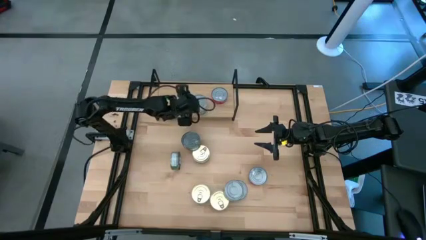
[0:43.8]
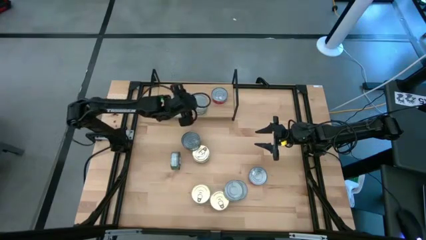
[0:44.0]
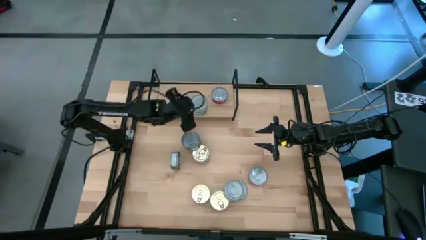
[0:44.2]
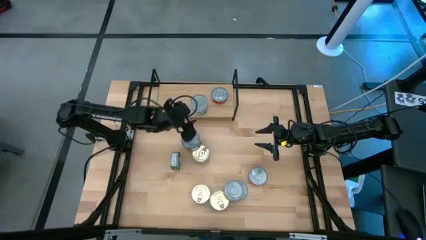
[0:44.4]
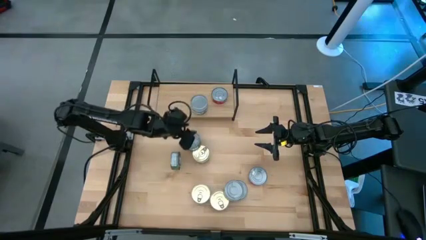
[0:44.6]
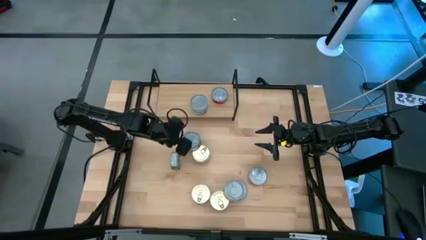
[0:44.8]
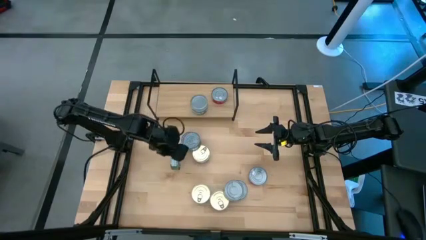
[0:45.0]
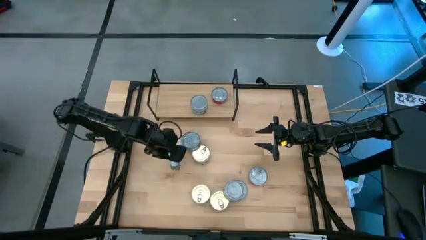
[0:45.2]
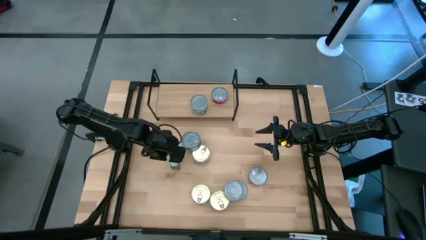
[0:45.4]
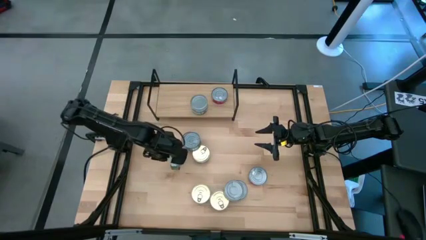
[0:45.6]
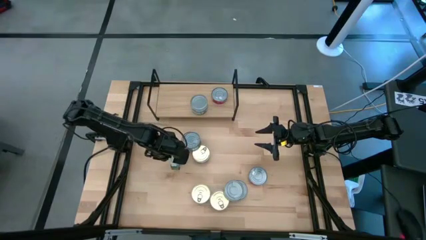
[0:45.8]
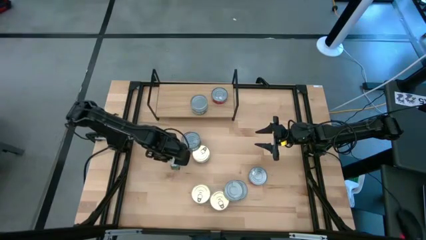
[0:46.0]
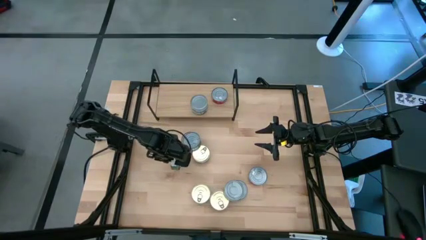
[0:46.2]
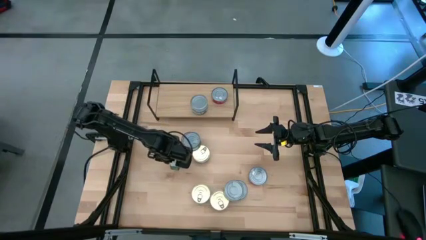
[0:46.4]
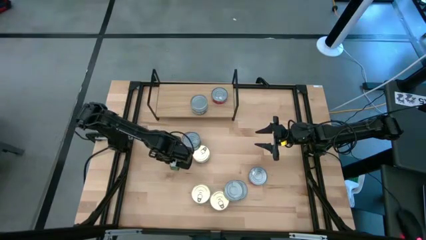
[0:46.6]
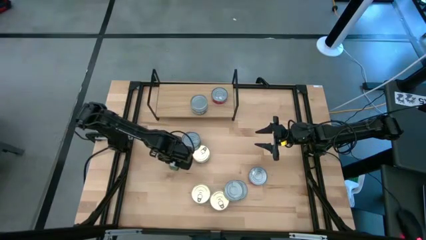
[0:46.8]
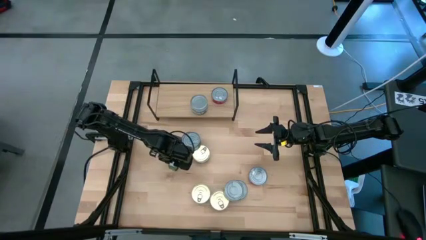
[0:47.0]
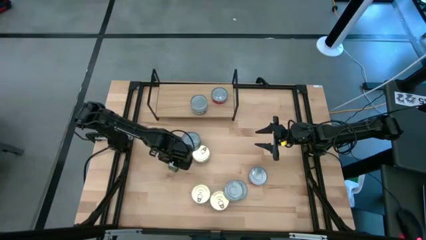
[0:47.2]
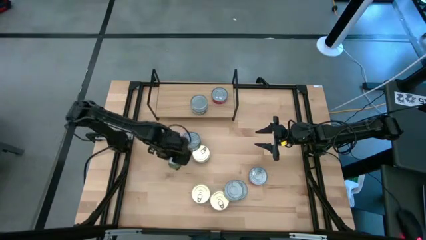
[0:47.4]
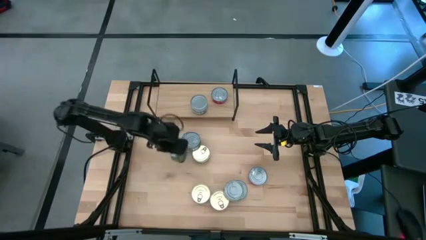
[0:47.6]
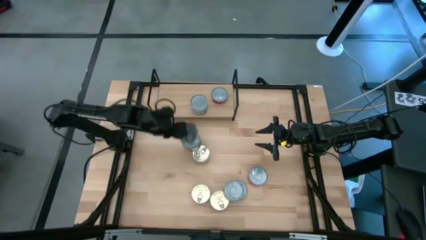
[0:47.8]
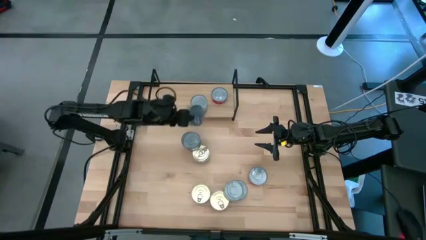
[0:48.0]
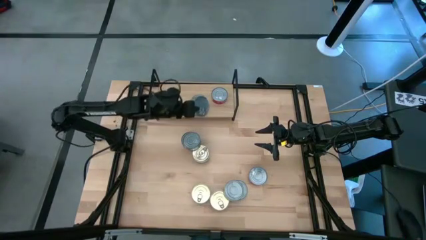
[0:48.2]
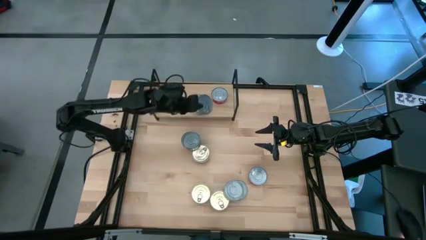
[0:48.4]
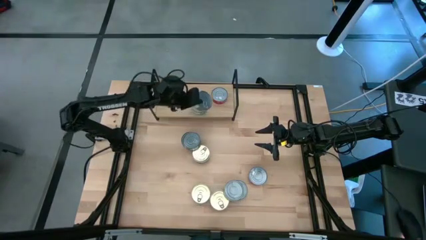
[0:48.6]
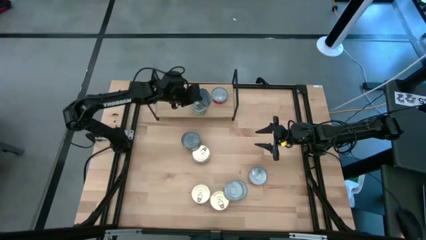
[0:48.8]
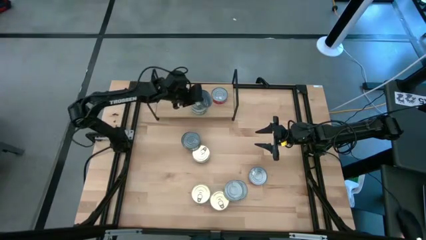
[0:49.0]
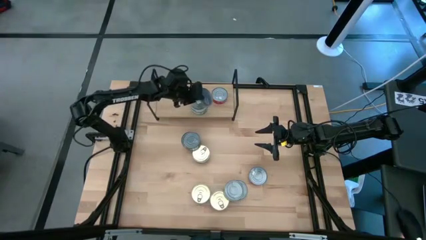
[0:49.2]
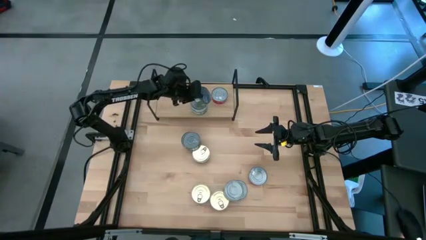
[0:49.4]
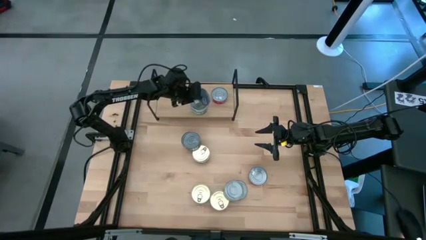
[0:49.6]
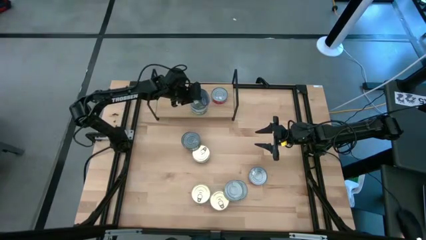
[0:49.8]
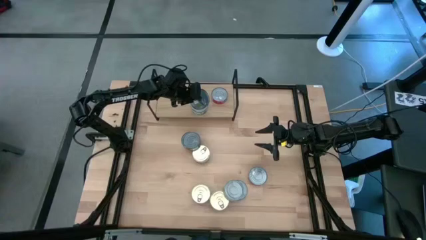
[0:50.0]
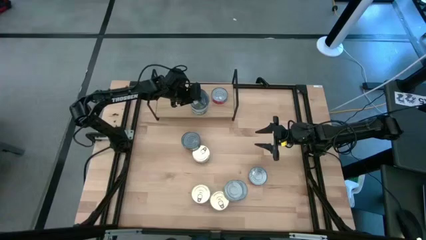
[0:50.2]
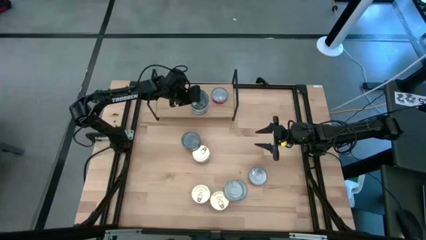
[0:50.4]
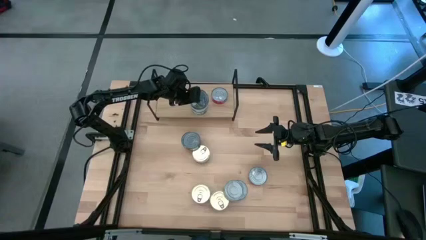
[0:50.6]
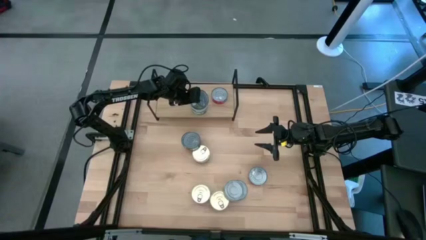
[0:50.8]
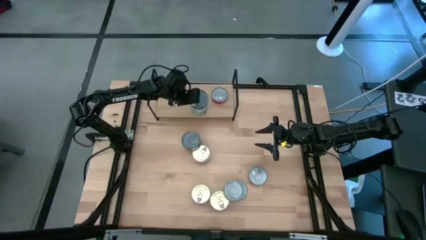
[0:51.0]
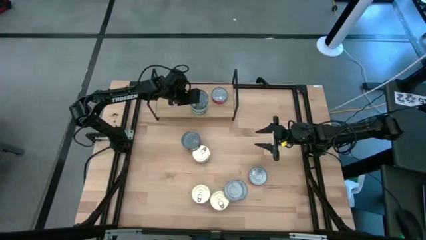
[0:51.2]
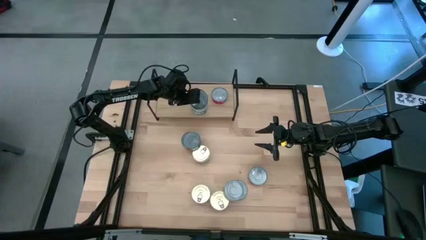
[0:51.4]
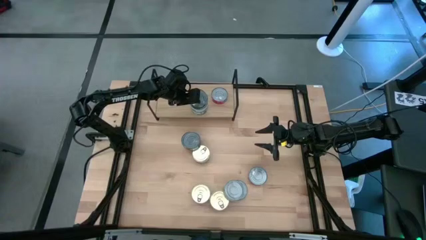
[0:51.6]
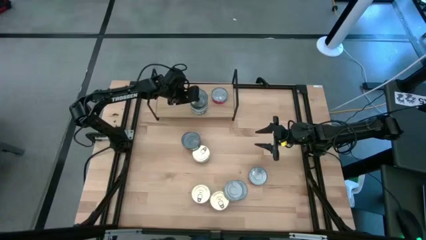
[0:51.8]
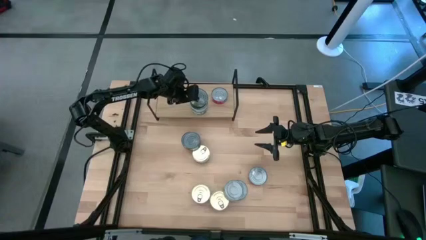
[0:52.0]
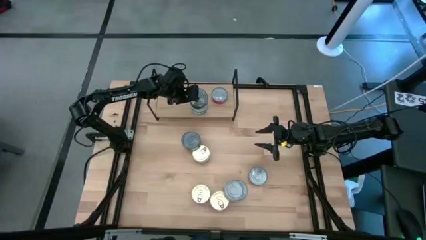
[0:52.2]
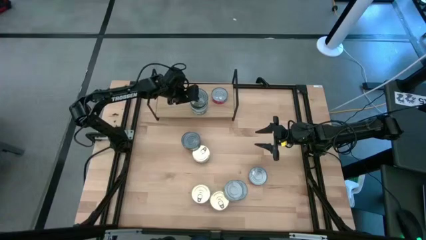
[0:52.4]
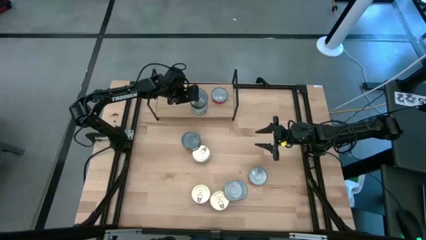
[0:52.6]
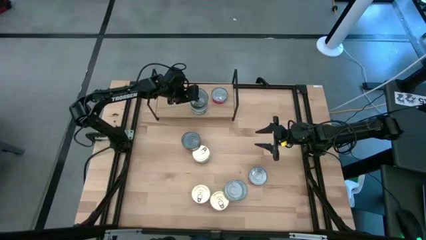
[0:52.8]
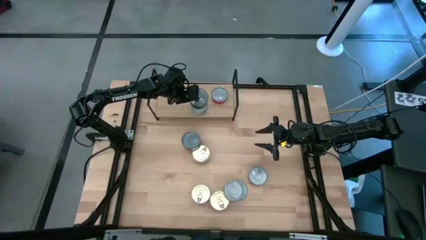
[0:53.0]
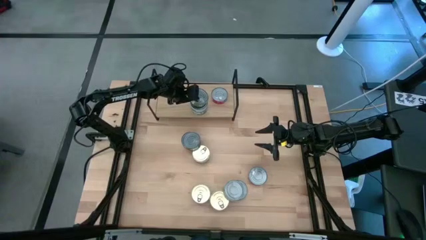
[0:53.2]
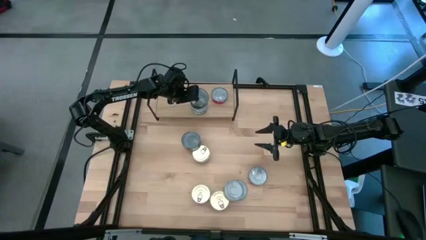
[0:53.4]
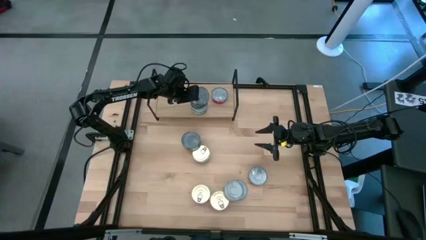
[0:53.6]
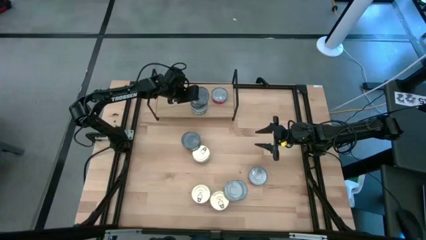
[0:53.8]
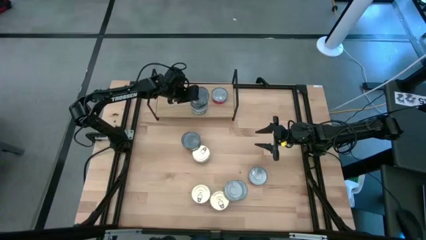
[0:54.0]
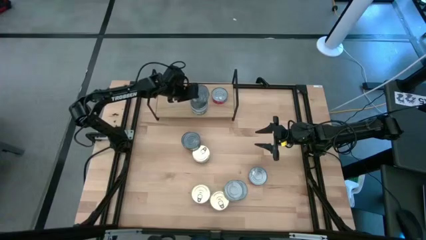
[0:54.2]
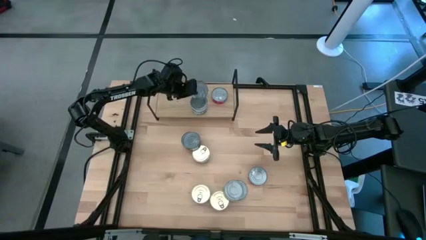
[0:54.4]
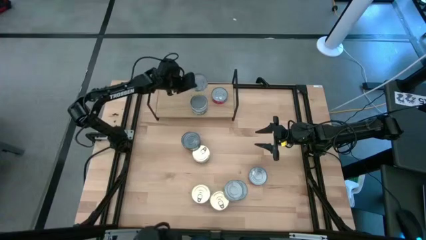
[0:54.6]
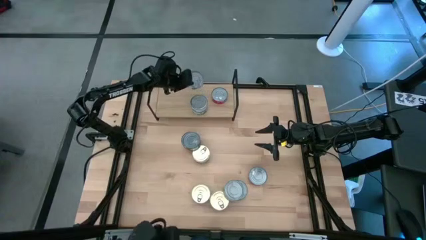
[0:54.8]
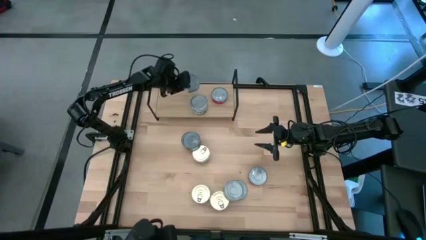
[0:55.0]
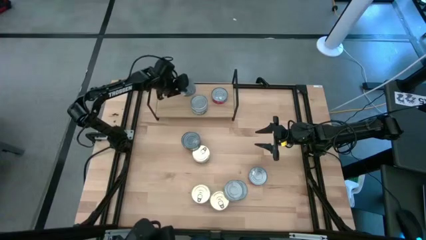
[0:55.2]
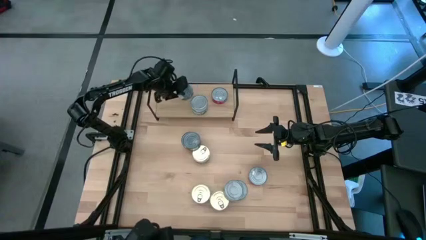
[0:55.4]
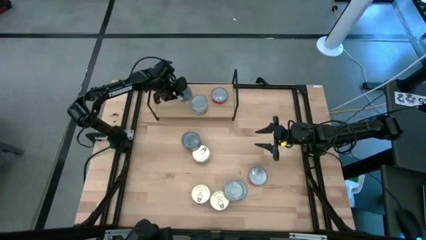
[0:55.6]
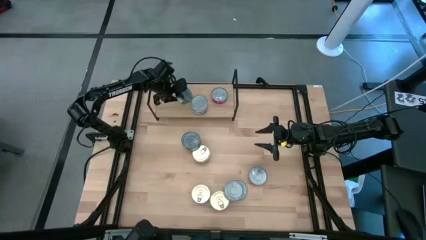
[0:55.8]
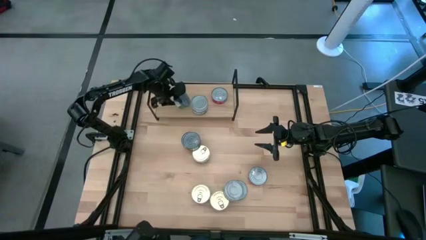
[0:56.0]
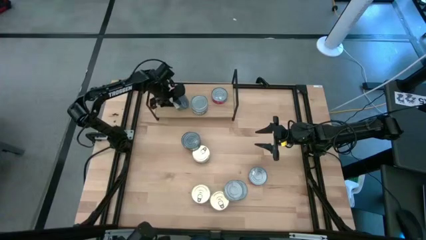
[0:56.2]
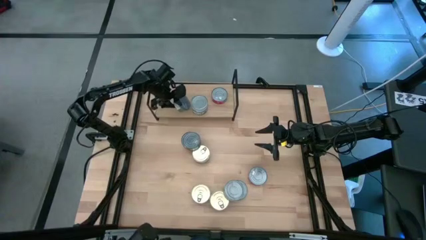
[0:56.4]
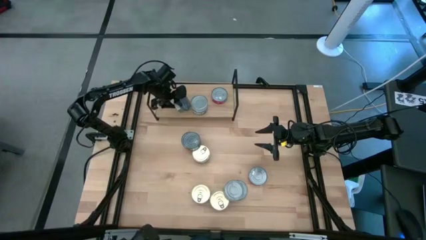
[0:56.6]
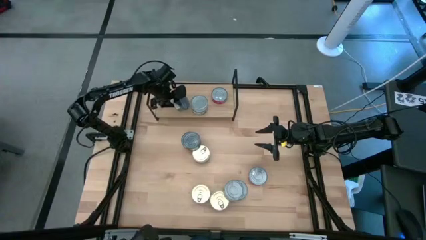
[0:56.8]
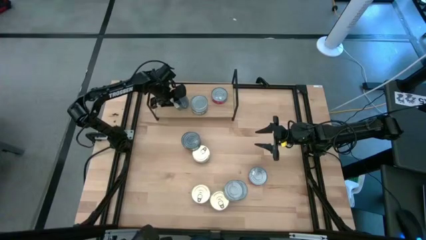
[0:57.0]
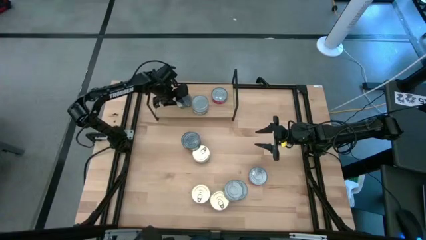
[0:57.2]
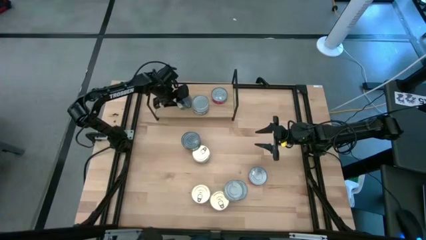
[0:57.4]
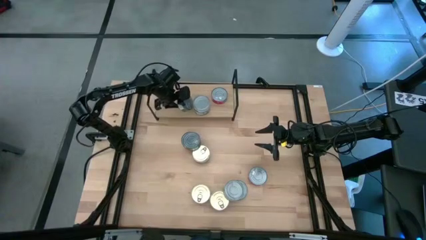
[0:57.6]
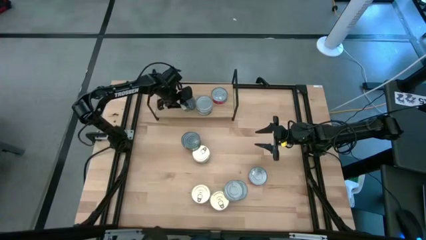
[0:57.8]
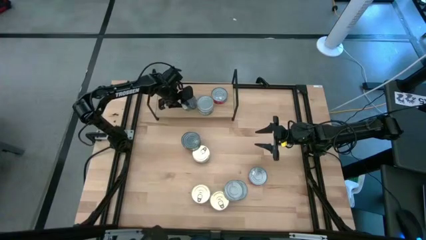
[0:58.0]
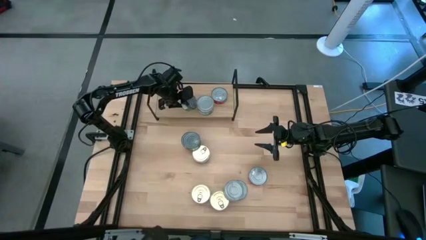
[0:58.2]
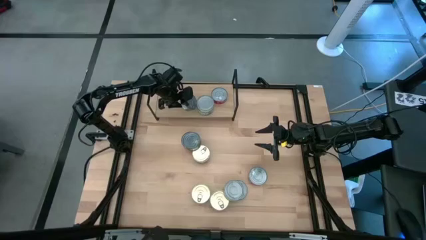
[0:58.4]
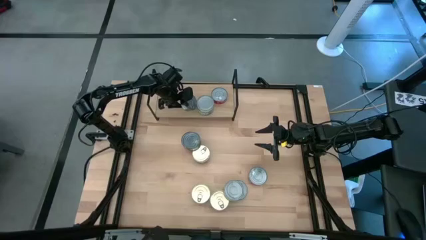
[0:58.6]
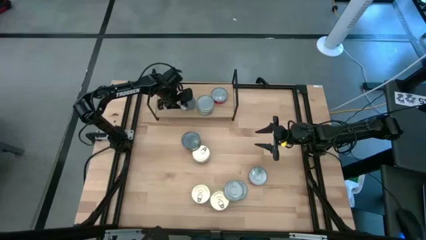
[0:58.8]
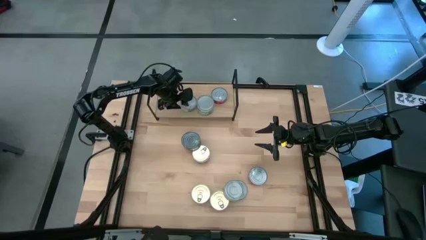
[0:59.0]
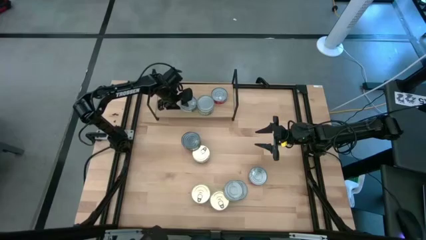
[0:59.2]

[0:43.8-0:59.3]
Task: Stack canned seafood by type on shelf
Put the green tuna can on the shelf
